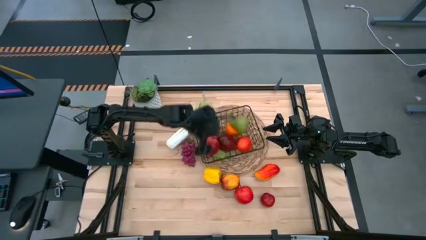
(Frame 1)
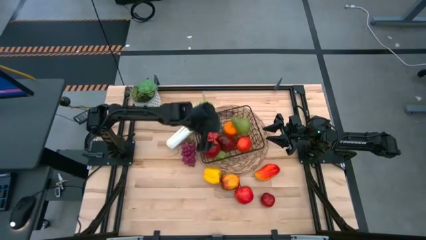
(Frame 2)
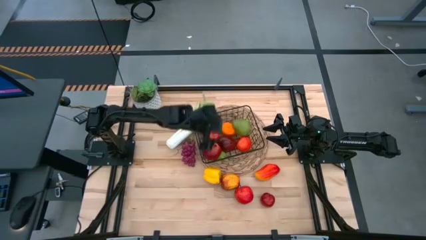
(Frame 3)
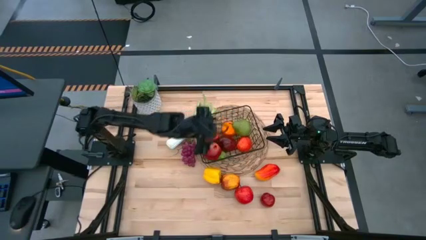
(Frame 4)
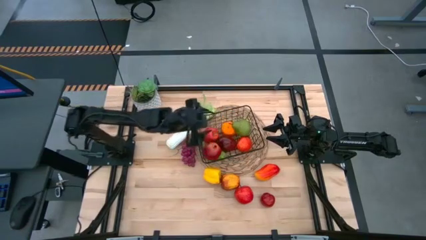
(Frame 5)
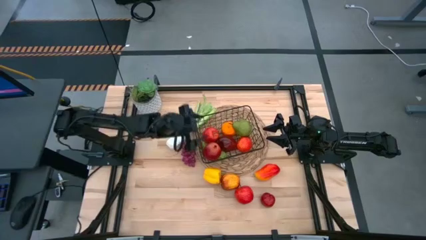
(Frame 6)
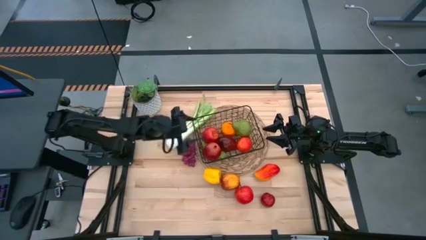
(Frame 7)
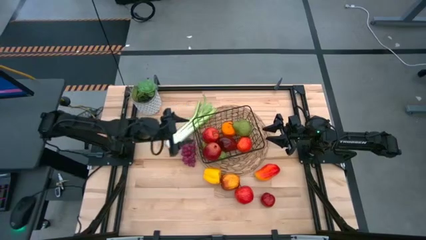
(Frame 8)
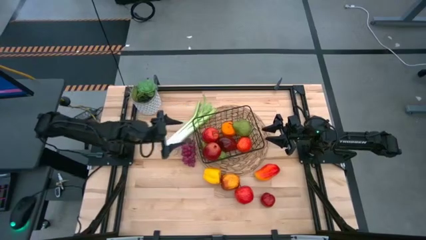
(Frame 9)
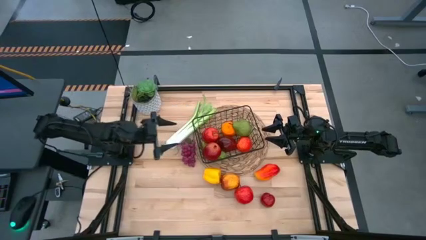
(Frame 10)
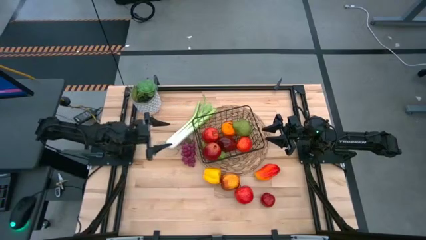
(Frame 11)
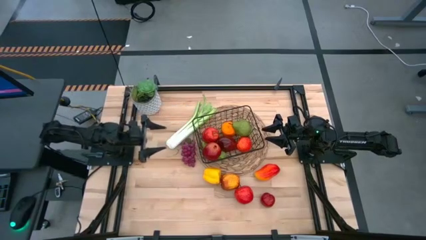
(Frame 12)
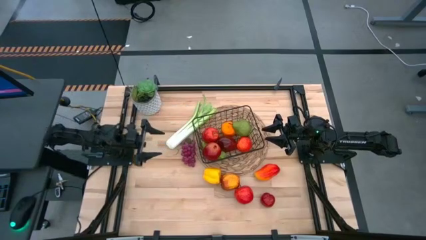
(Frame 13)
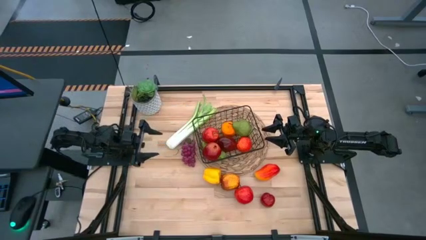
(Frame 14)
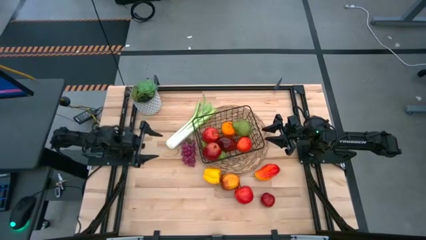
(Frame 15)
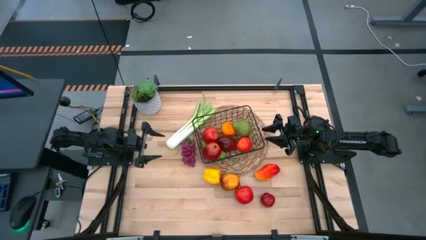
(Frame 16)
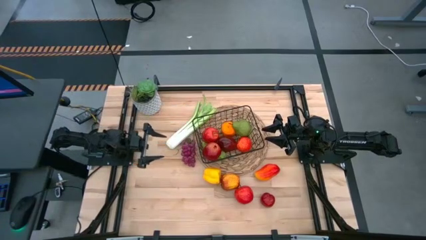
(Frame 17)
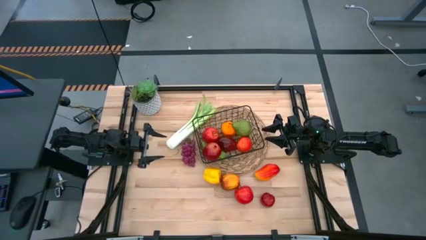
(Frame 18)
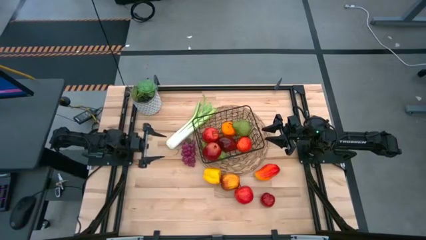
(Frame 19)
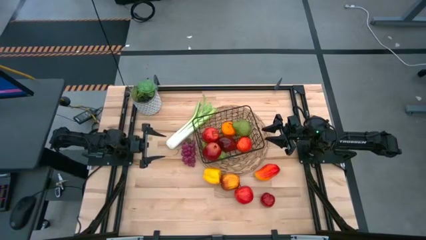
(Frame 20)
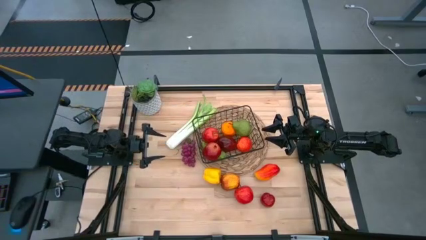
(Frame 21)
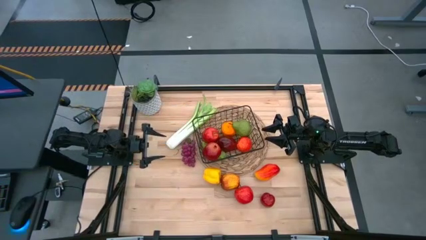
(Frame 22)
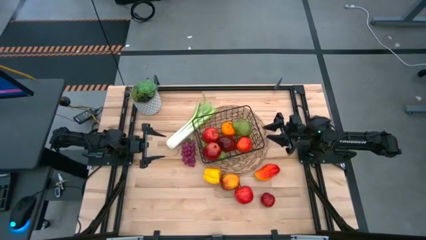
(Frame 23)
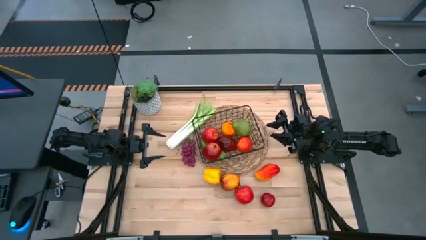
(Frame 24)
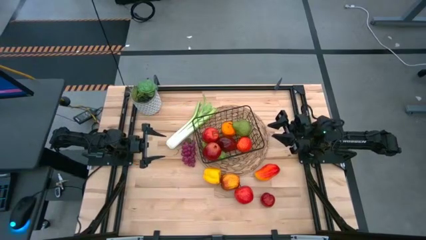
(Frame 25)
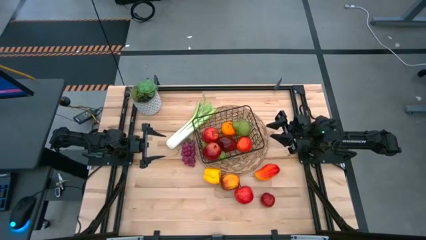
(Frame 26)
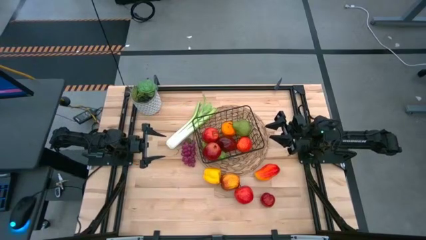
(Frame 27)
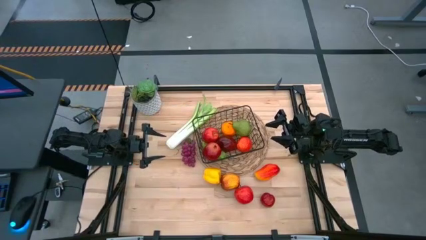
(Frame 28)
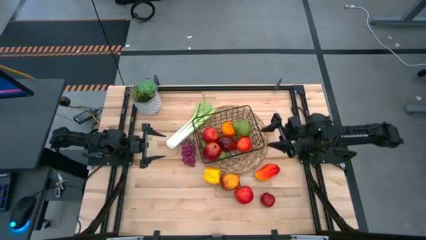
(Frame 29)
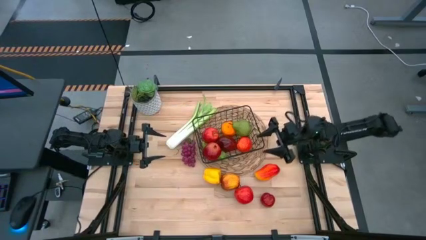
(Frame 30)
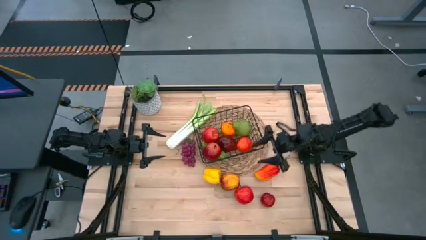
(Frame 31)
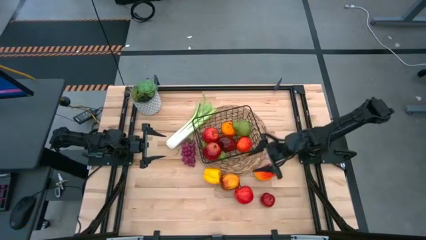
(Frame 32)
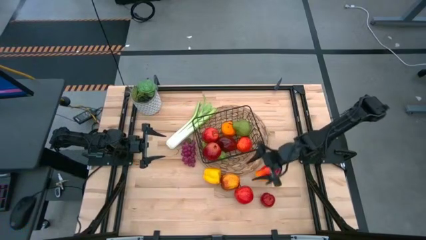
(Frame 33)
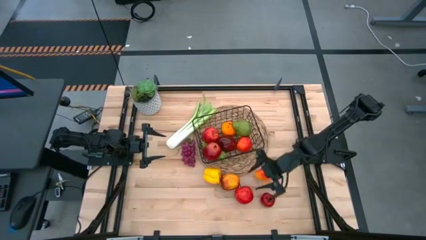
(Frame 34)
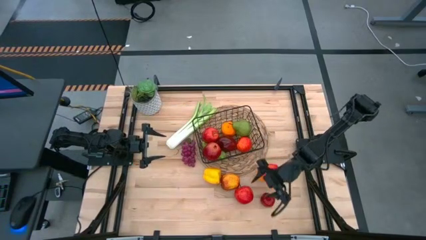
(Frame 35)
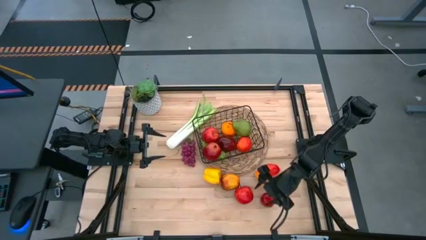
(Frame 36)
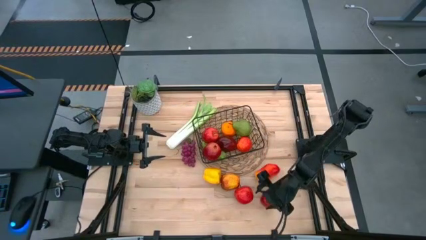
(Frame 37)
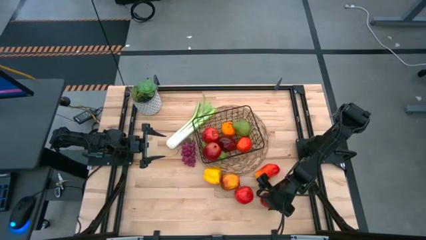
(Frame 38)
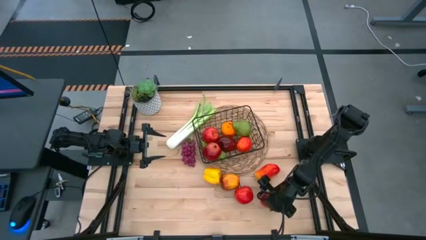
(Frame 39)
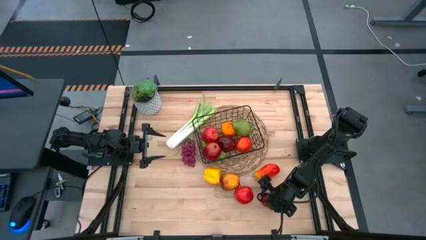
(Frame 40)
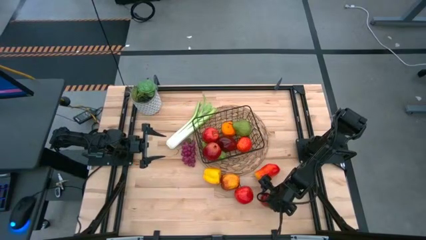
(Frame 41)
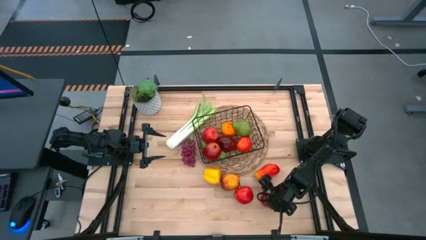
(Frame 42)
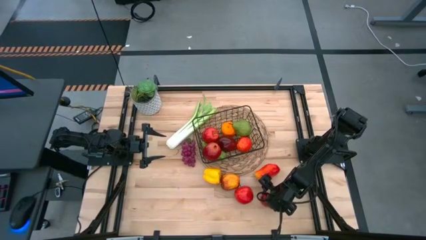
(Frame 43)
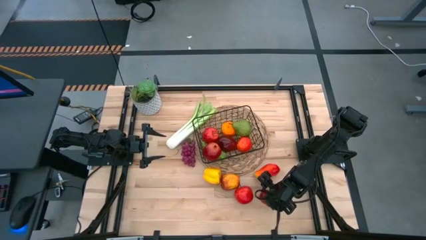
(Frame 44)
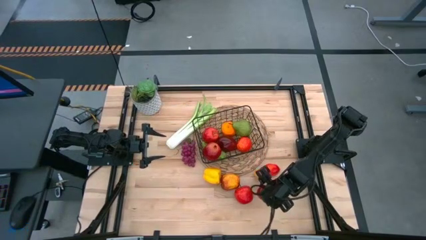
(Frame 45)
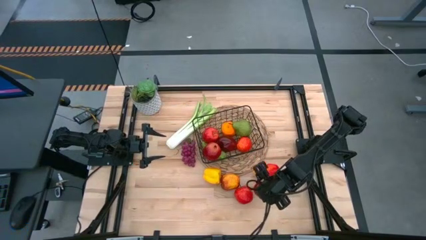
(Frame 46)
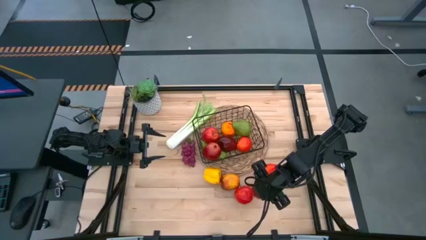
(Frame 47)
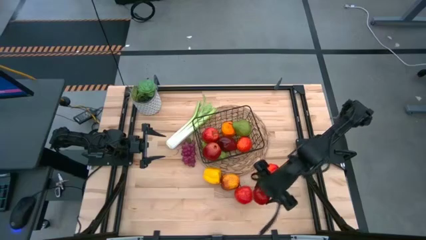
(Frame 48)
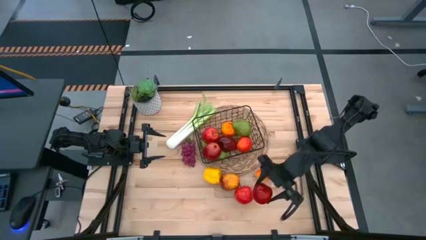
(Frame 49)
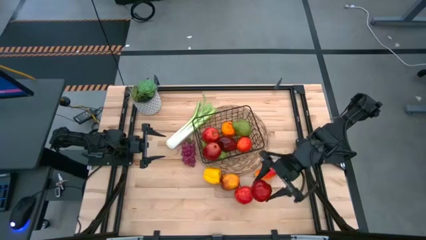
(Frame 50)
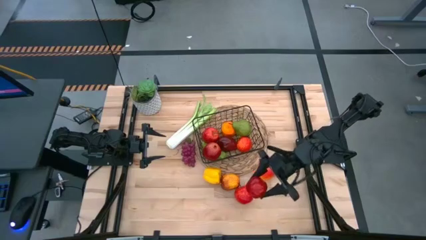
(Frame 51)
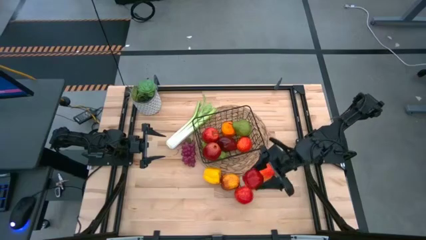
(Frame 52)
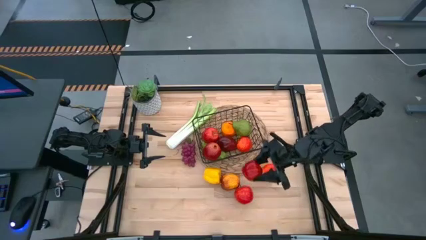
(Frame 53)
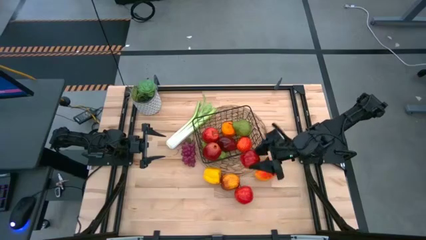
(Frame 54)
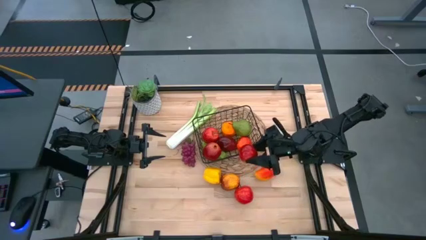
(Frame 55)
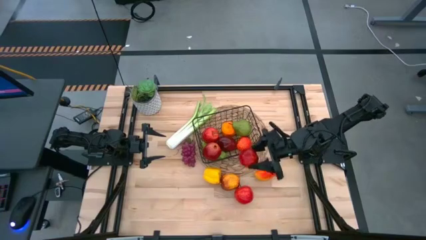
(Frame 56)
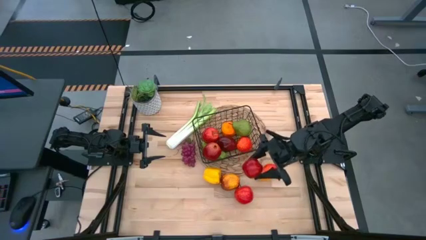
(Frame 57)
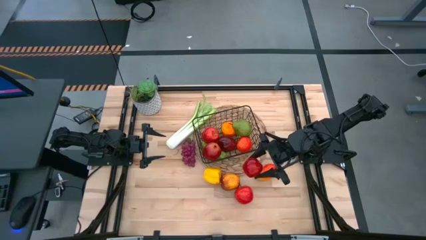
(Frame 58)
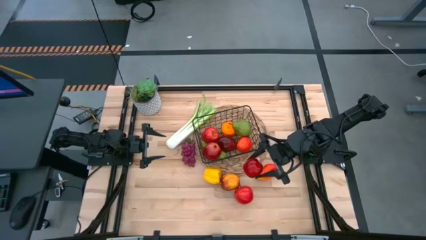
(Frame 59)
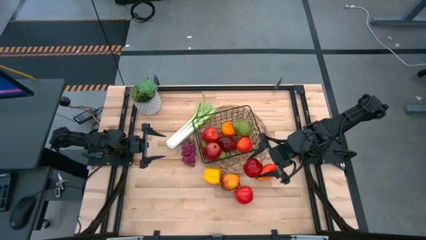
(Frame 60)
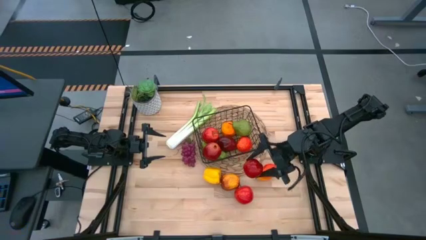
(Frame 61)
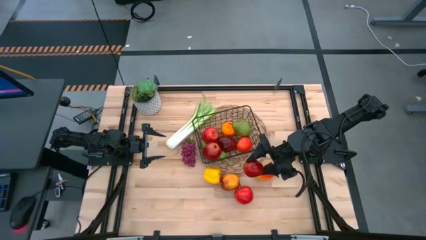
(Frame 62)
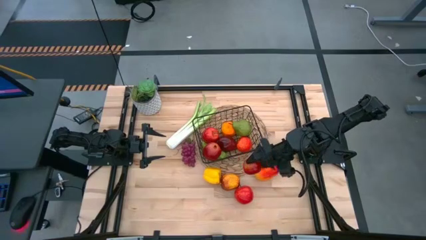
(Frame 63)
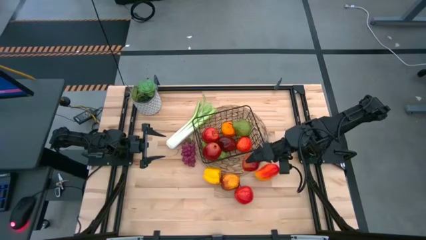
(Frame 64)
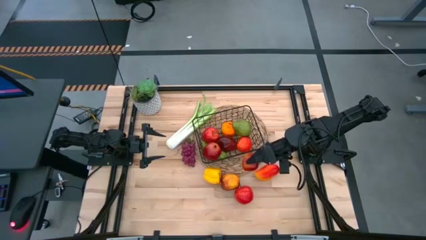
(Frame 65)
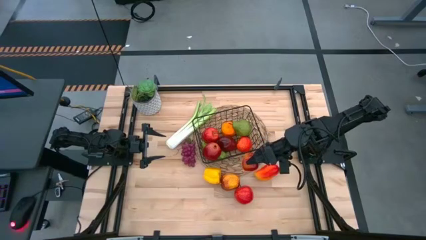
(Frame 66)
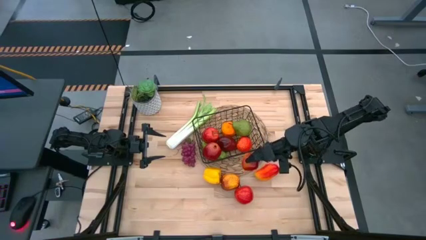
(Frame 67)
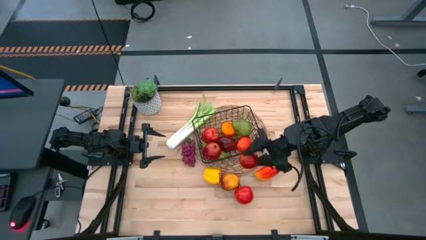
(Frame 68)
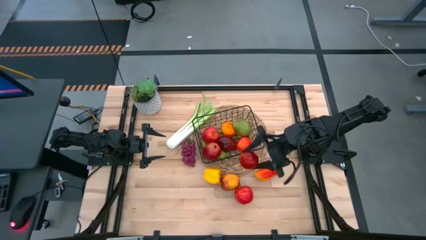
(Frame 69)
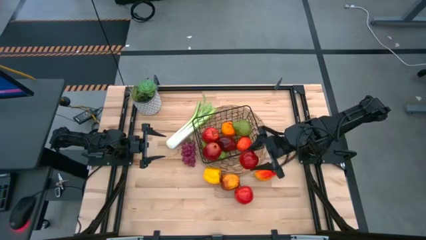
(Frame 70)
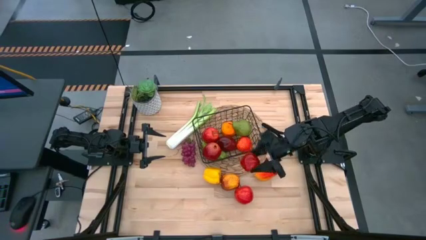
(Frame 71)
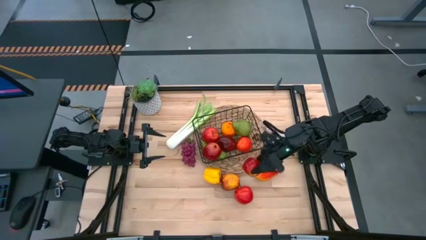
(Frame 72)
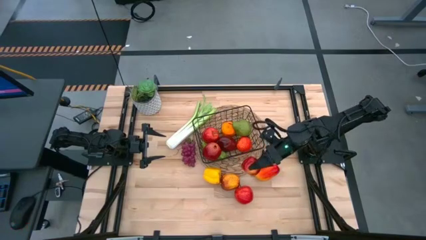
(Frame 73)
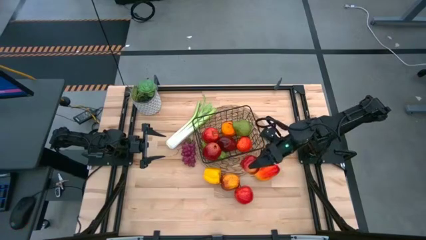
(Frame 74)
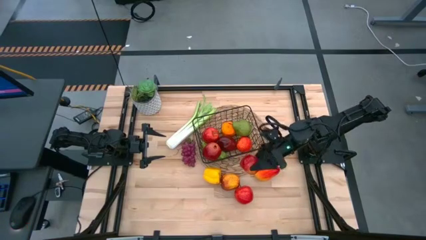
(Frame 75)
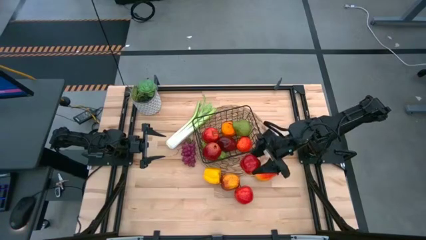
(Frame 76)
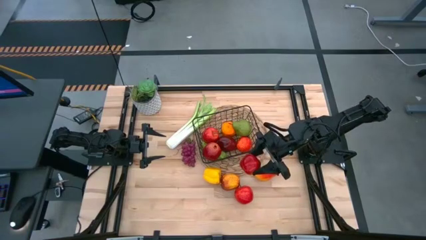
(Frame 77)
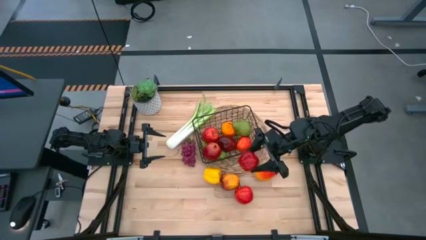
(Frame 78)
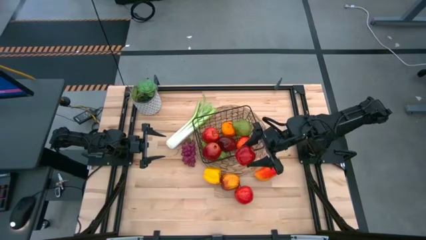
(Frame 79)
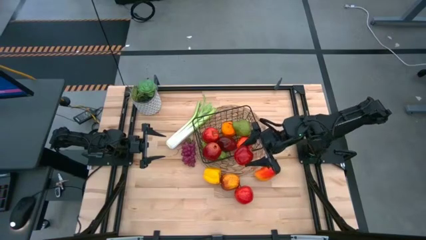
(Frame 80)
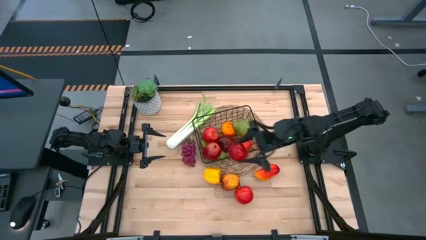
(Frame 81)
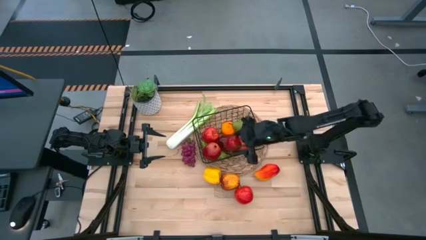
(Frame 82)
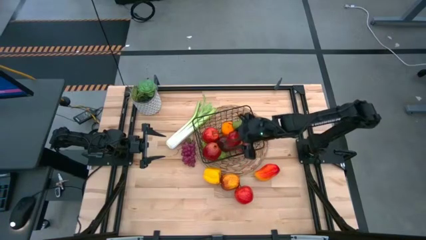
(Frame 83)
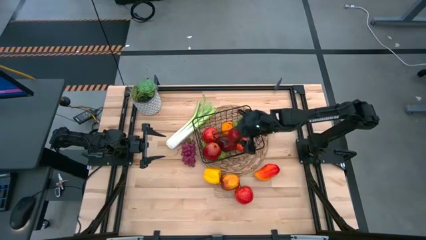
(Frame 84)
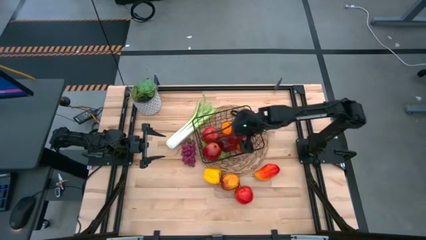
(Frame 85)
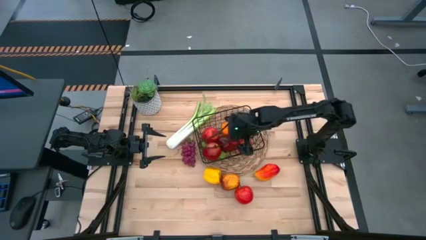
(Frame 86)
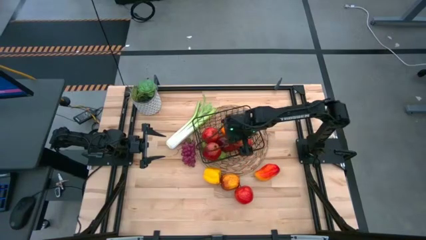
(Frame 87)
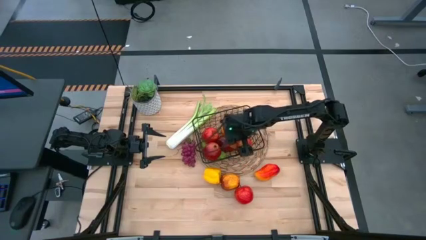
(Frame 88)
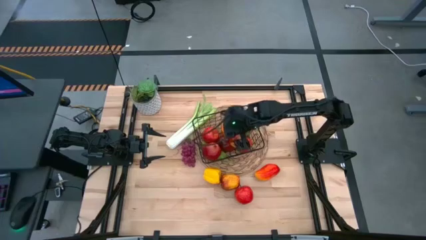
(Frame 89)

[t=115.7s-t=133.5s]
Task: Build produce basket
Put the red apple into the black wire basket
